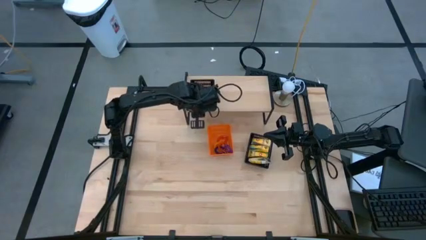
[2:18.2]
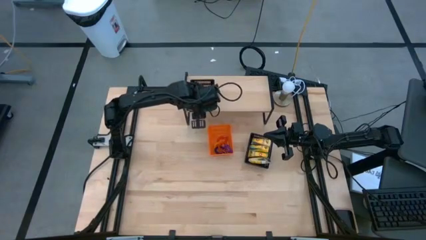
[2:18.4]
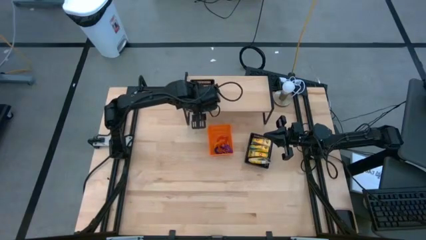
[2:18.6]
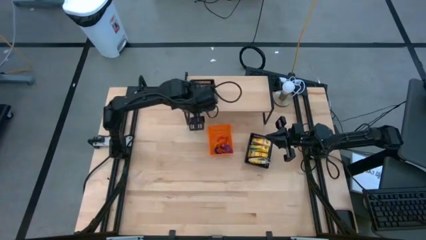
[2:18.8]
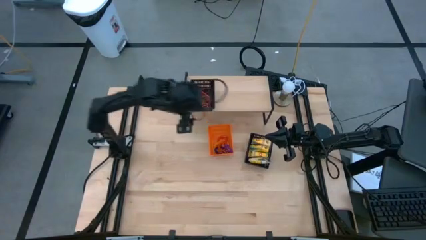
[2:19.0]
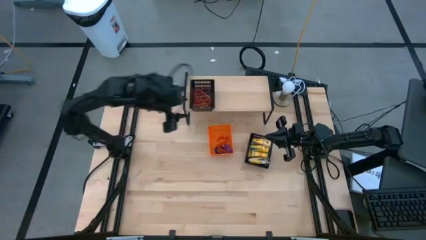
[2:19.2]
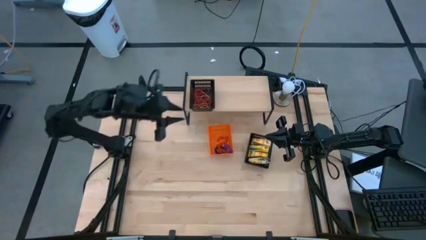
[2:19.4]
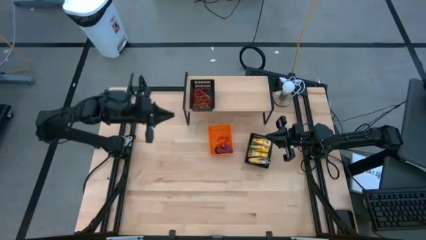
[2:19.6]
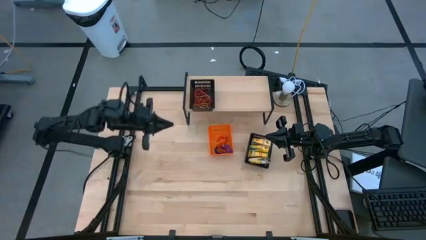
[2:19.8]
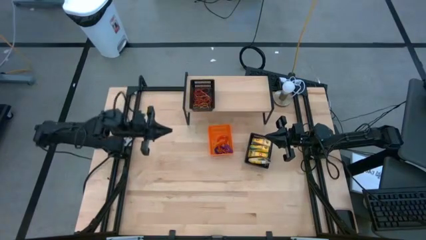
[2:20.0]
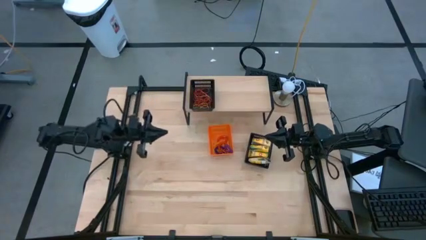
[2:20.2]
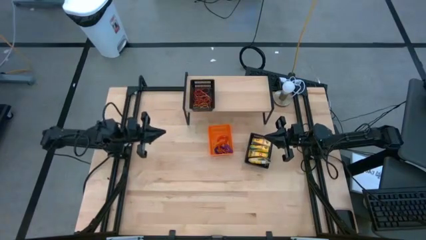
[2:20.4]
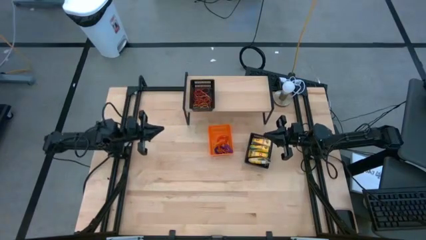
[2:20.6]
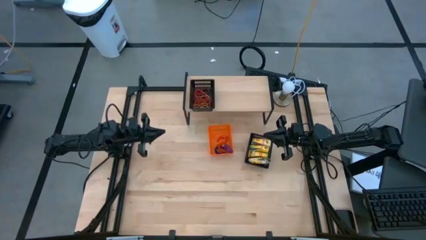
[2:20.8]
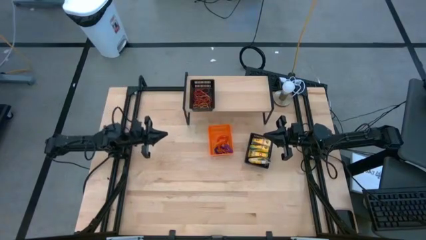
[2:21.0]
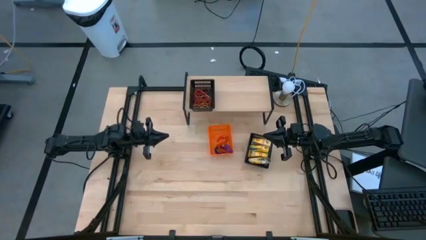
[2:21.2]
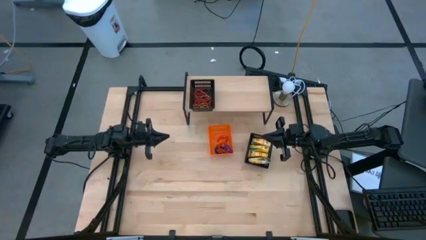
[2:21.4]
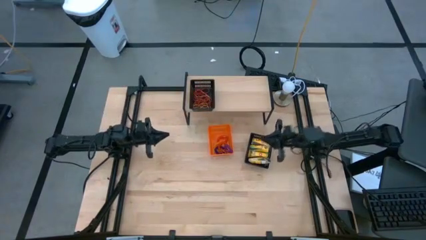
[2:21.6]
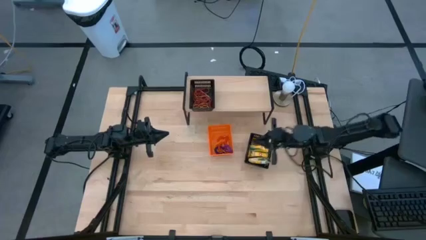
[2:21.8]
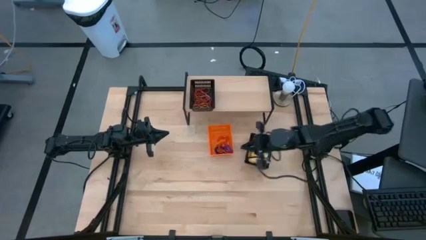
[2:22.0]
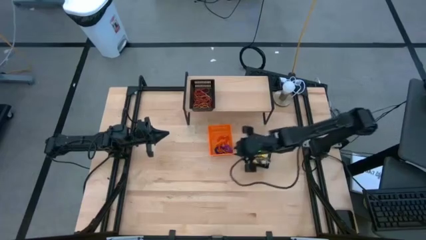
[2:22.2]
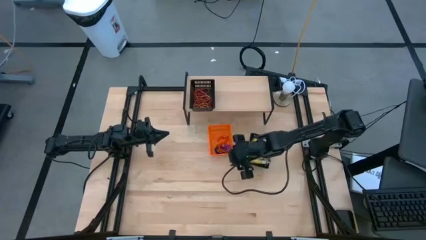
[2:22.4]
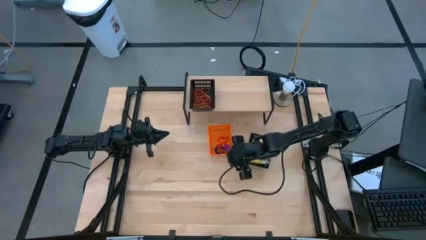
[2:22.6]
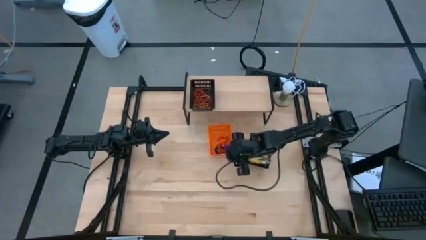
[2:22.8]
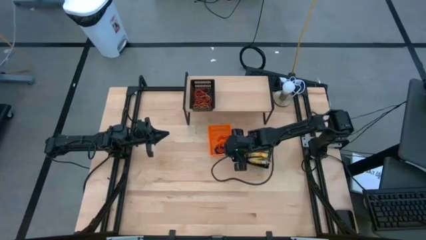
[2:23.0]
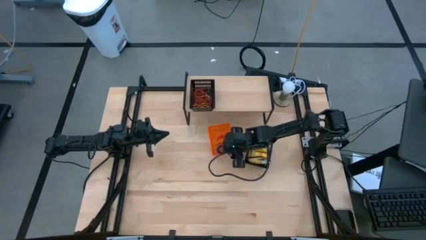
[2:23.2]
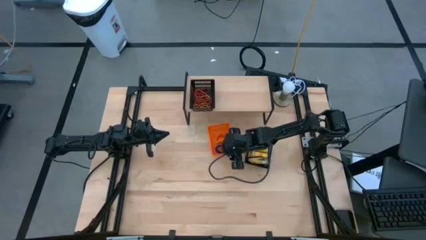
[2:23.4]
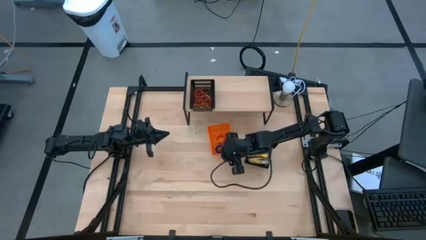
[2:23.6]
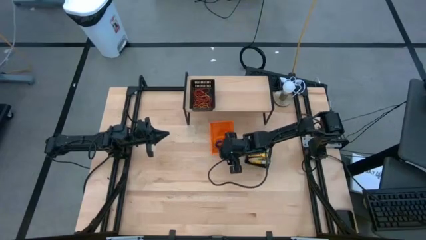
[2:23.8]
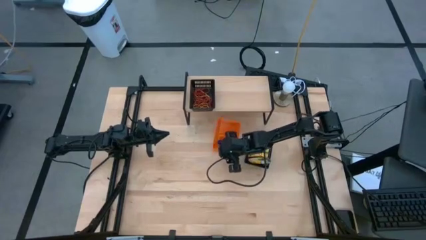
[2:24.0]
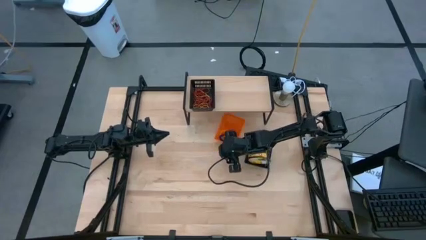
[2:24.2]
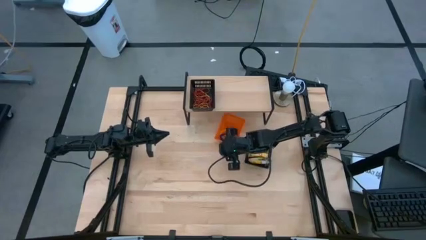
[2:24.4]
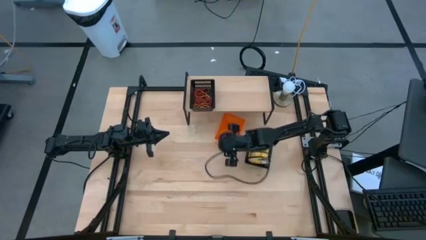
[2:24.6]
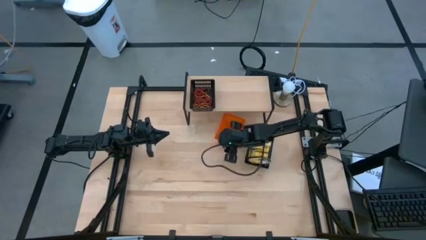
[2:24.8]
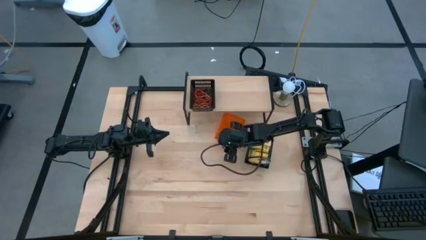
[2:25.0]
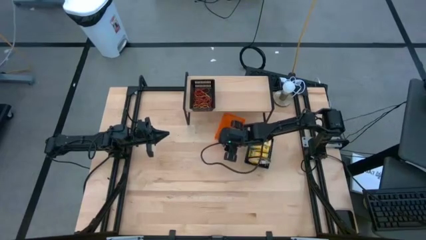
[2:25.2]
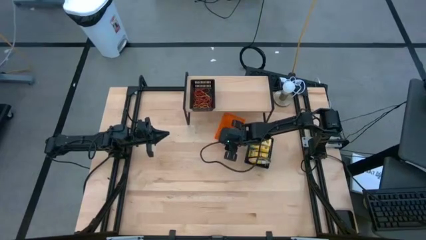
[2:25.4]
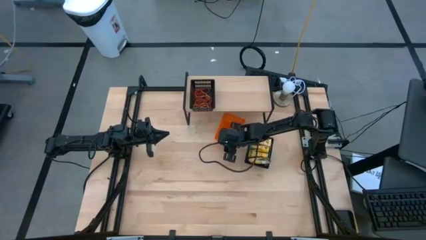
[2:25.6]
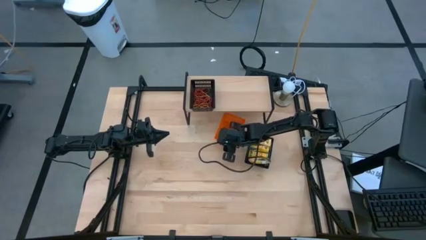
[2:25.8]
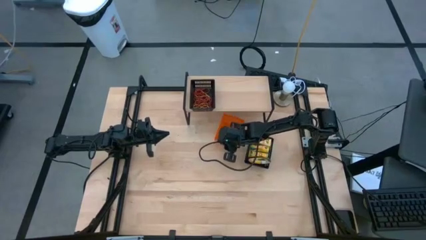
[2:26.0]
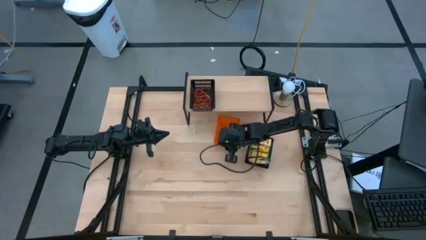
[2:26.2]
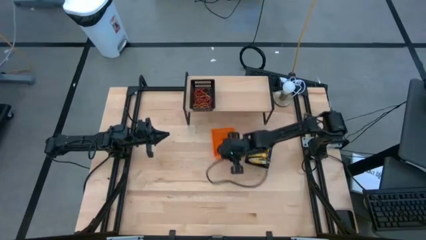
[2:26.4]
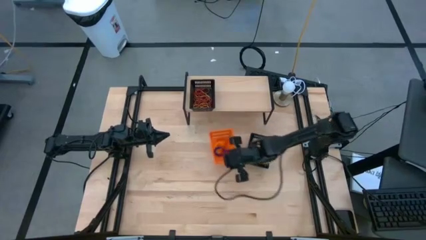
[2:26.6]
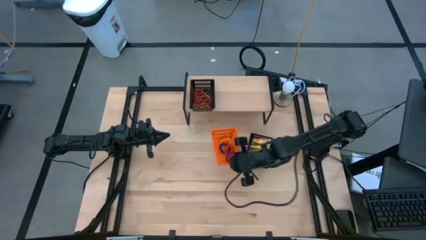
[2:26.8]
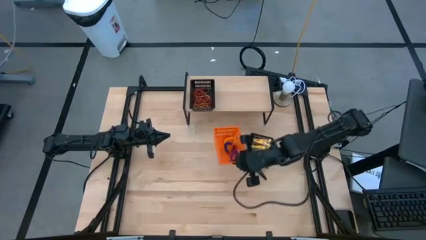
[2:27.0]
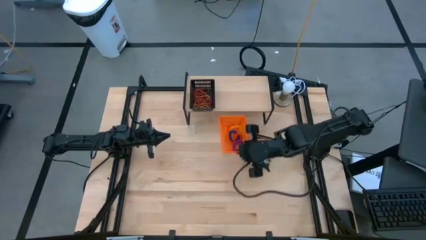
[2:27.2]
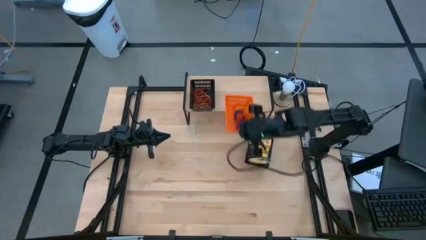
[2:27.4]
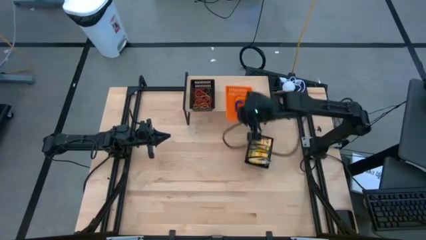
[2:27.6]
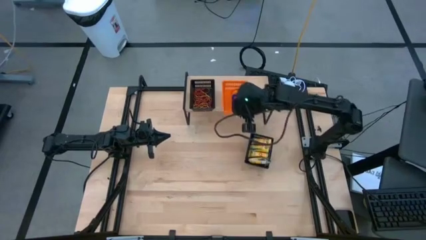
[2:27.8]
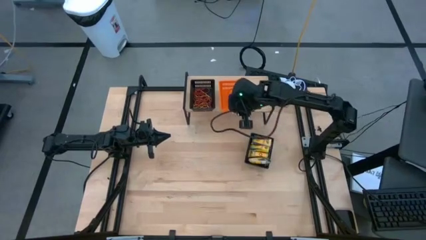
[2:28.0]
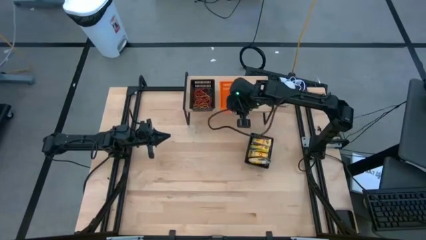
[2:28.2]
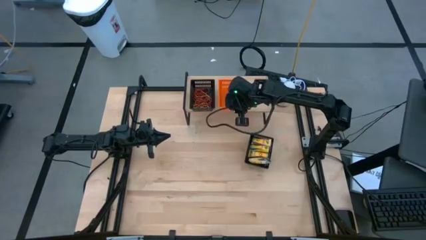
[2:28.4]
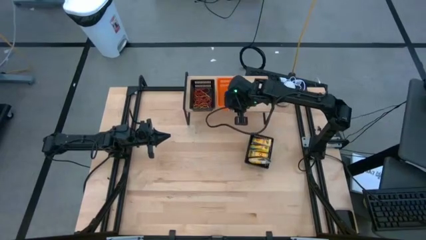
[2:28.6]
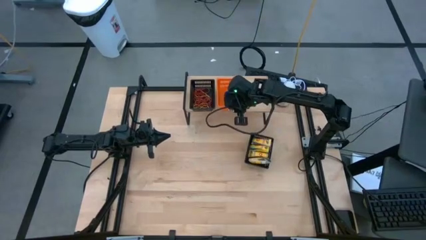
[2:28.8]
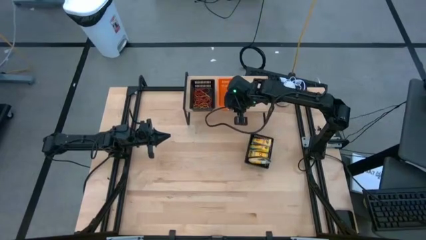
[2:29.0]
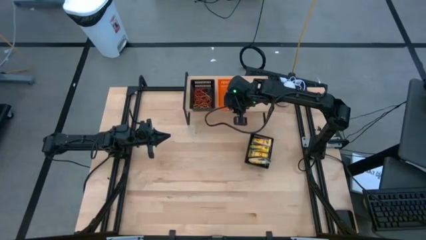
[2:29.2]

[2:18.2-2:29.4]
Task: Pick & Place Office Desk Supplies
Put the orange bin on the shelf

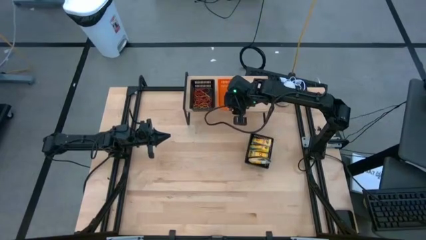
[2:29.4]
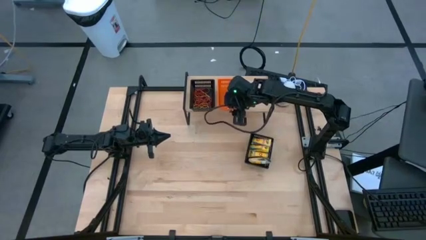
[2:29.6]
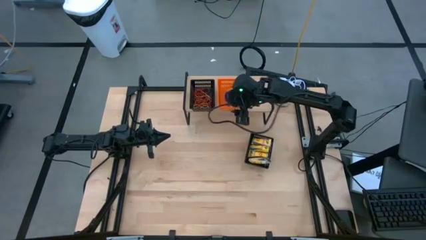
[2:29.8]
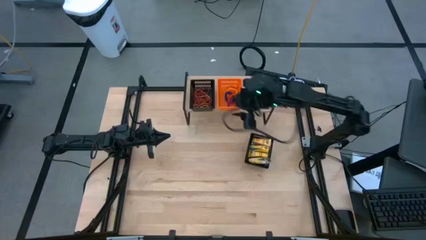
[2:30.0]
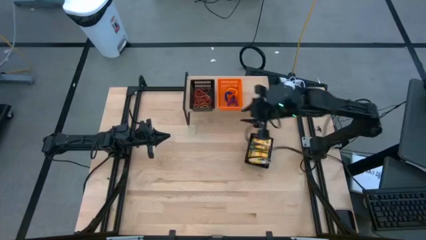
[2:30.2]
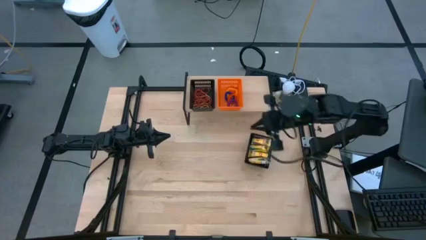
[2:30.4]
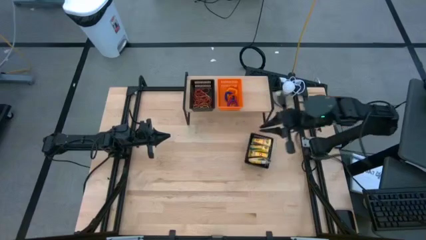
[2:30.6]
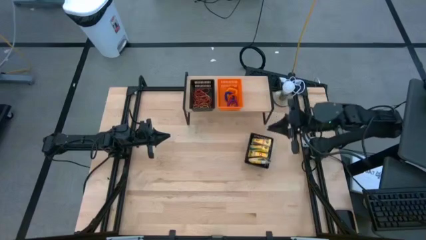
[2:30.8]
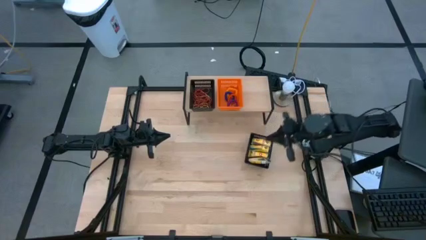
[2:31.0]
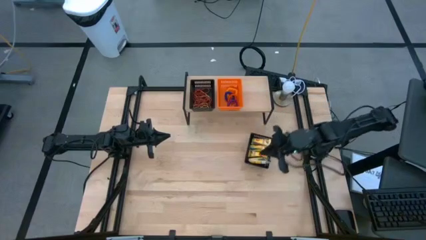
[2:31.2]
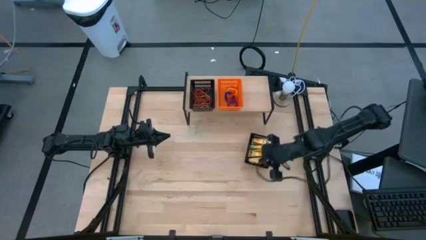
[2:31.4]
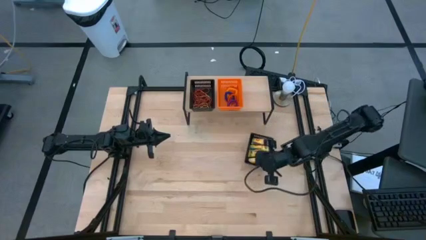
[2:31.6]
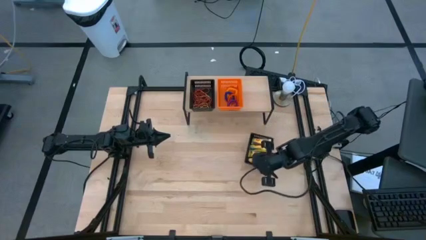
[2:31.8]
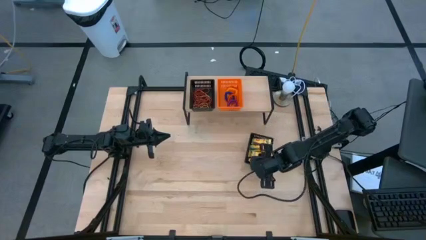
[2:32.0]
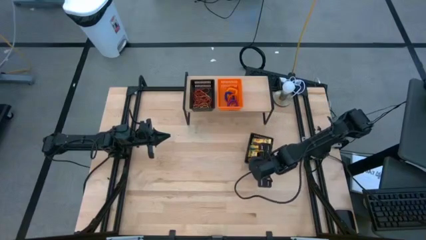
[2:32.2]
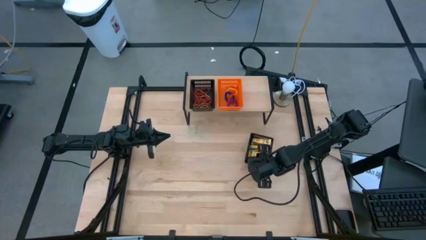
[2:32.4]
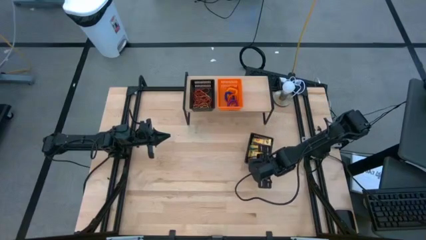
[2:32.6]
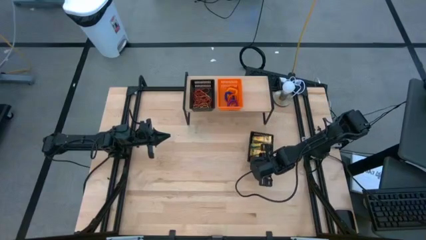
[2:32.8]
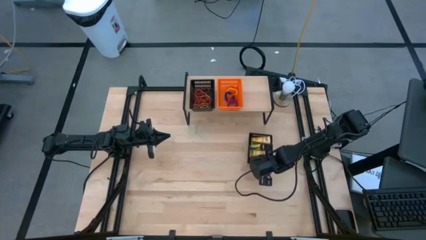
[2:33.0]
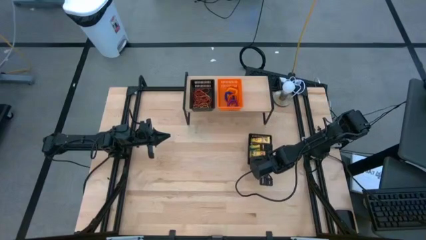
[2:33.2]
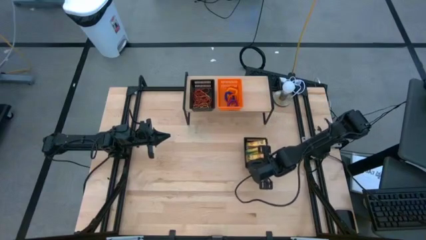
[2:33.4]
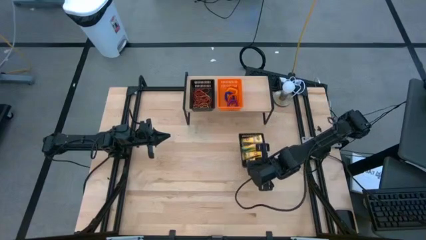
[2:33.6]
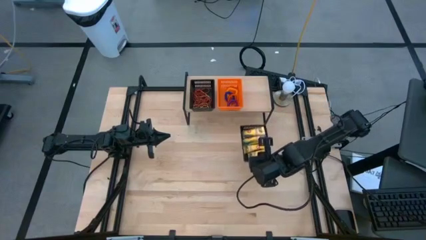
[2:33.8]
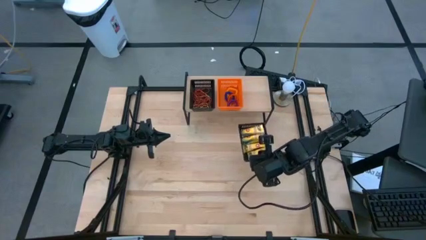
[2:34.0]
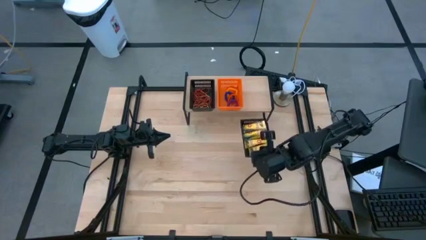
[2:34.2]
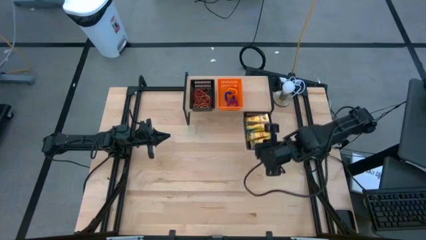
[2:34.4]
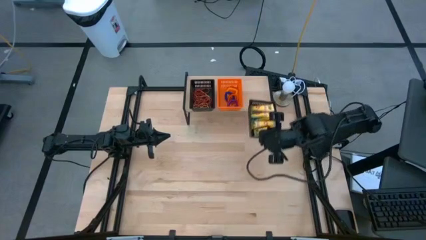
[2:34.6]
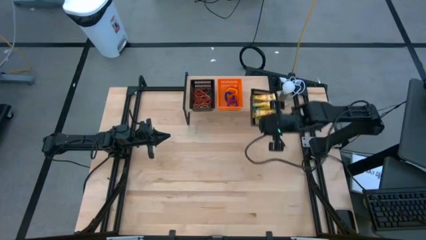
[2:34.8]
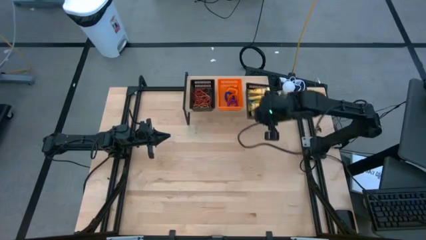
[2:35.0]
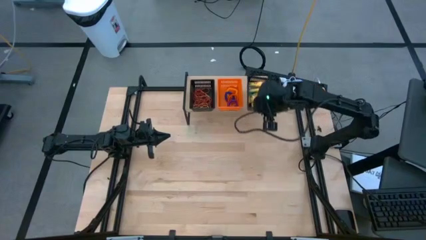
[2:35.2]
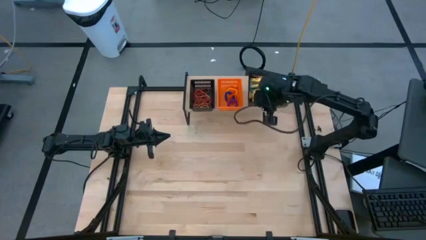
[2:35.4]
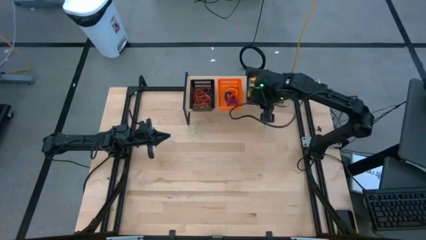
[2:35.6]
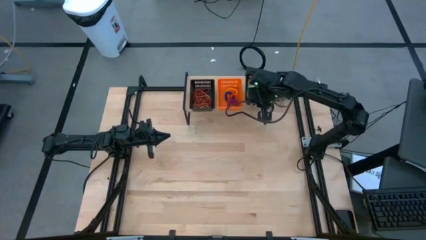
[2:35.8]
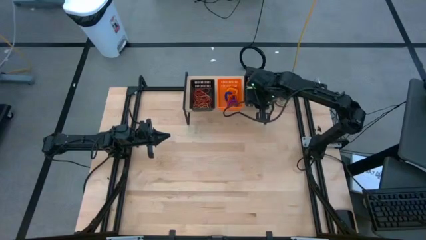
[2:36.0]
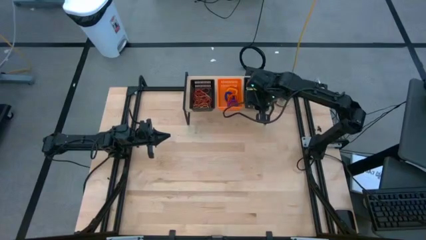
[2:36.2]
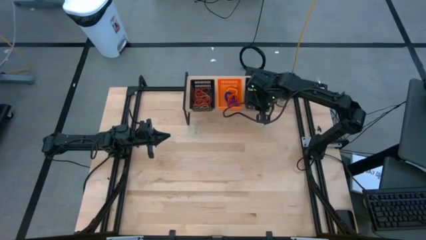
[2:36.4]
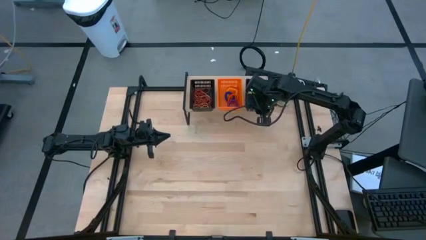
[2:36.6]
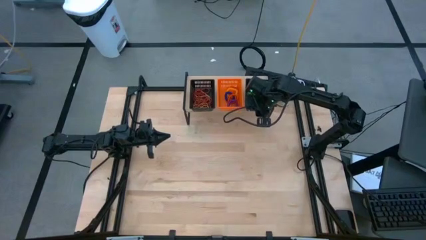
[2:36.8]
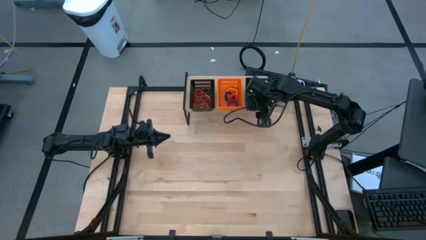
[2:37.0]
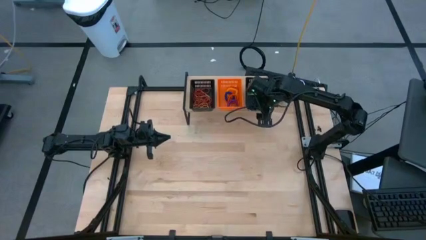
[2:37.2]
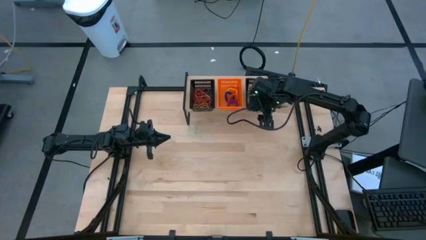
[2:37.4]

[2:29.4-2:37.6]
Put the black bin on the shelf
